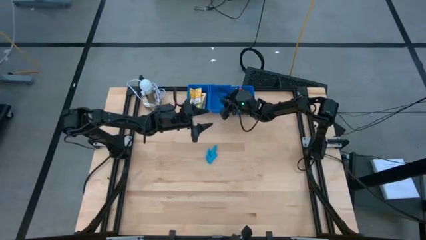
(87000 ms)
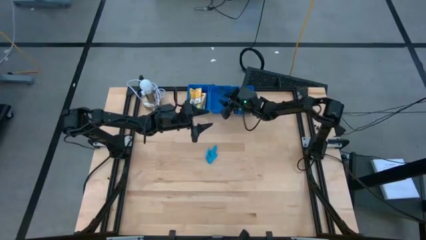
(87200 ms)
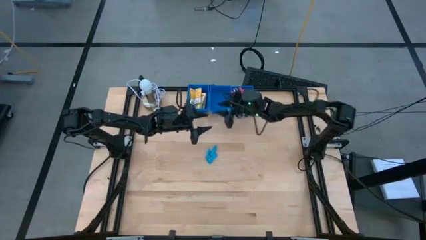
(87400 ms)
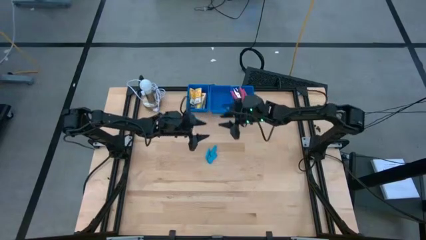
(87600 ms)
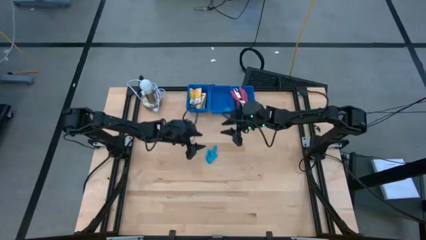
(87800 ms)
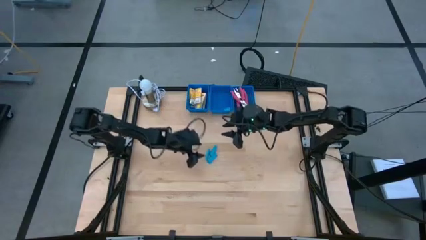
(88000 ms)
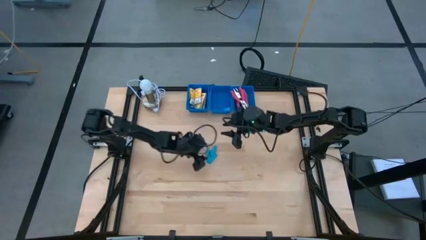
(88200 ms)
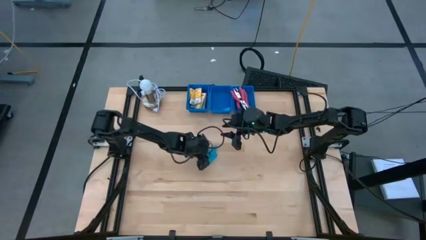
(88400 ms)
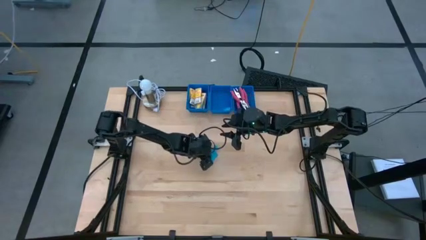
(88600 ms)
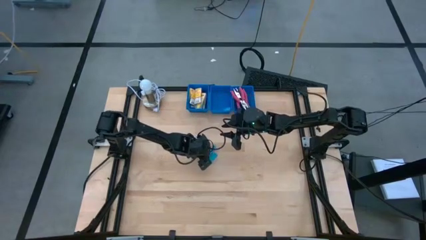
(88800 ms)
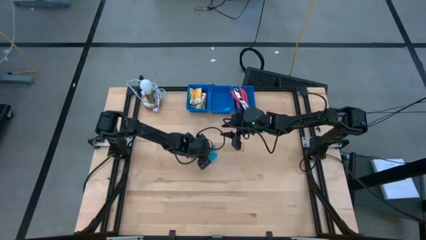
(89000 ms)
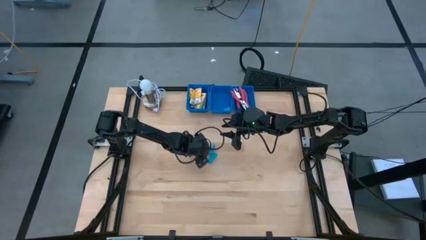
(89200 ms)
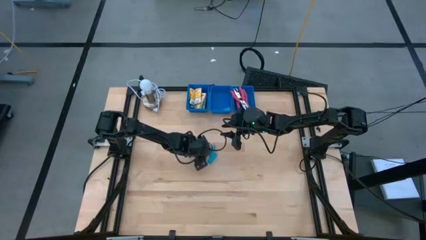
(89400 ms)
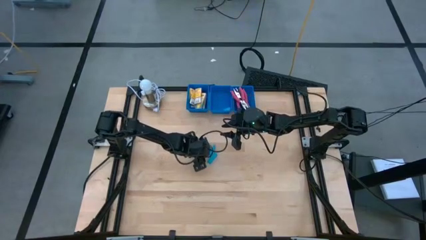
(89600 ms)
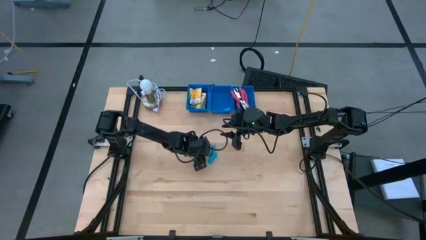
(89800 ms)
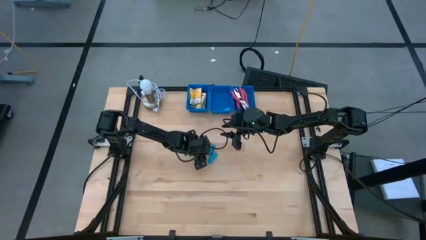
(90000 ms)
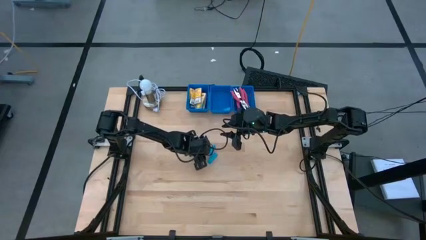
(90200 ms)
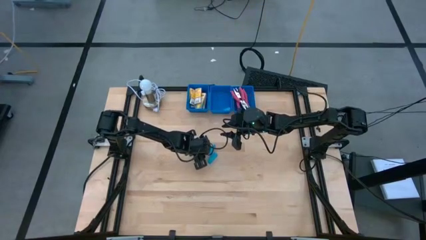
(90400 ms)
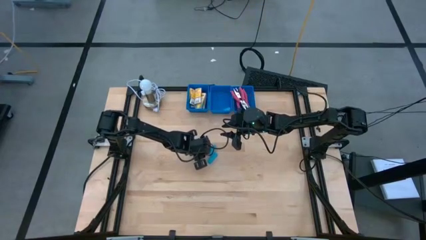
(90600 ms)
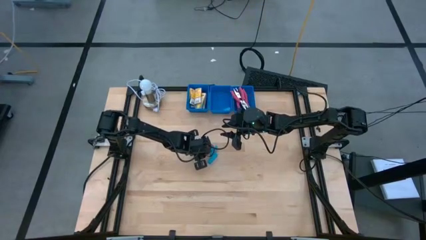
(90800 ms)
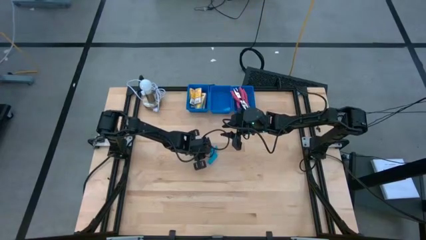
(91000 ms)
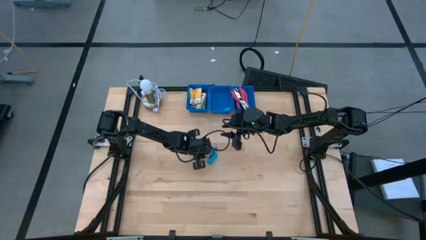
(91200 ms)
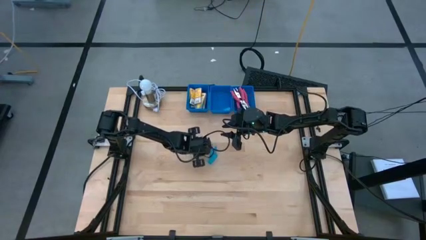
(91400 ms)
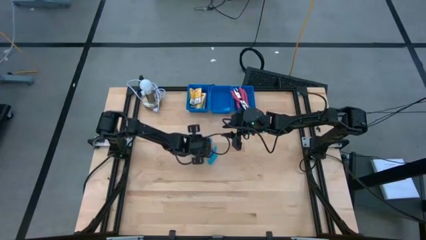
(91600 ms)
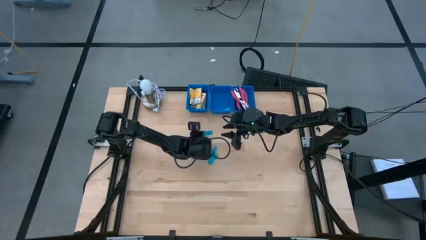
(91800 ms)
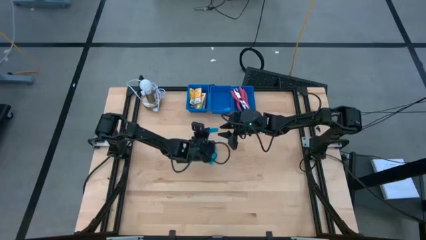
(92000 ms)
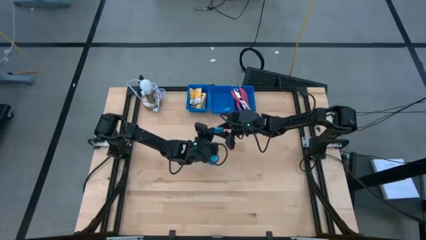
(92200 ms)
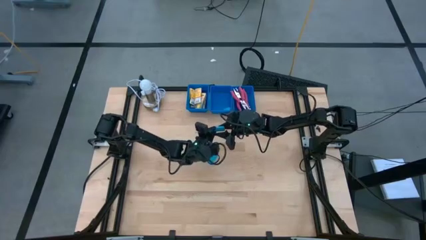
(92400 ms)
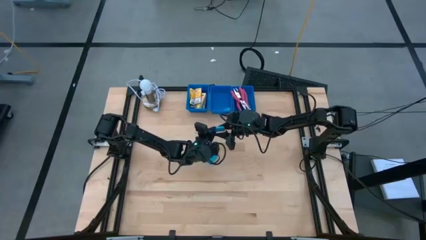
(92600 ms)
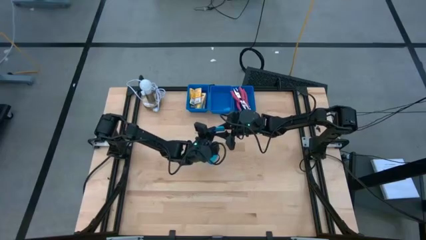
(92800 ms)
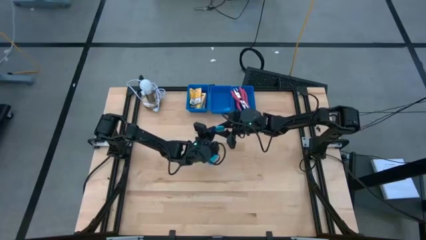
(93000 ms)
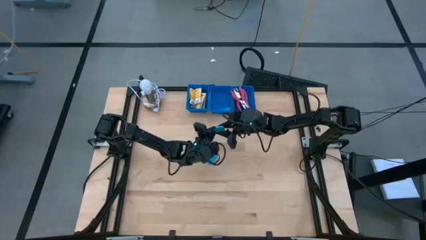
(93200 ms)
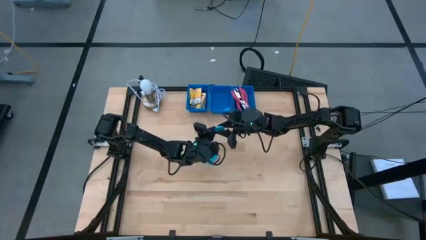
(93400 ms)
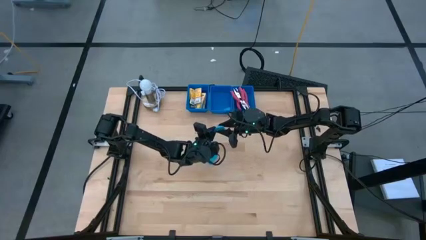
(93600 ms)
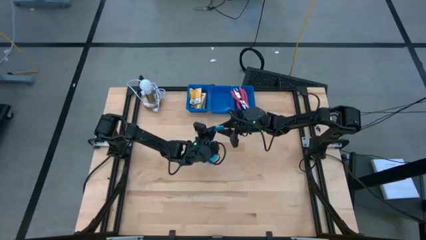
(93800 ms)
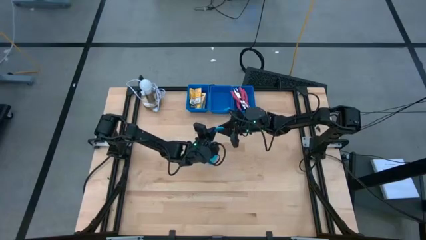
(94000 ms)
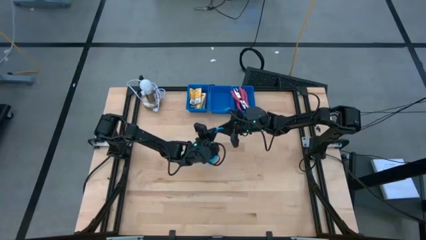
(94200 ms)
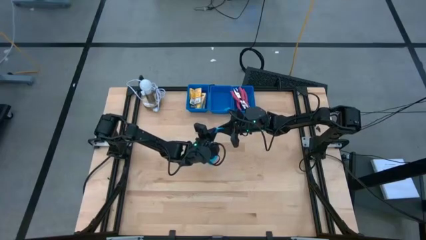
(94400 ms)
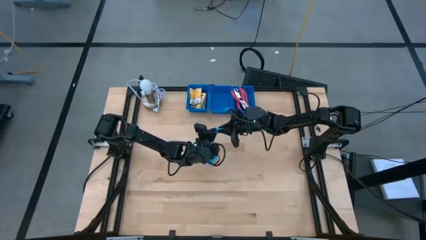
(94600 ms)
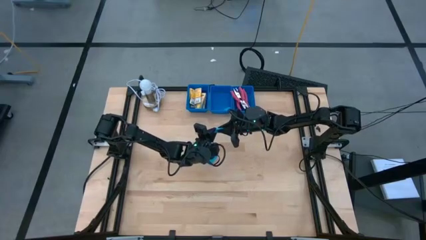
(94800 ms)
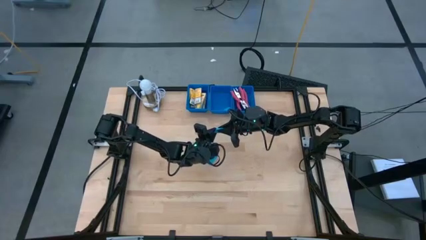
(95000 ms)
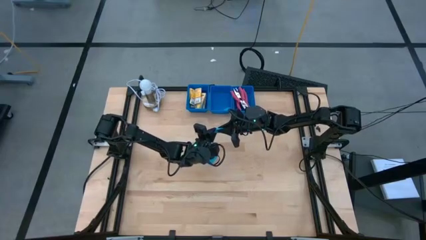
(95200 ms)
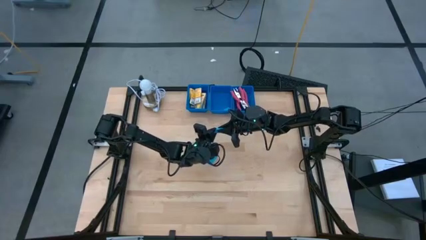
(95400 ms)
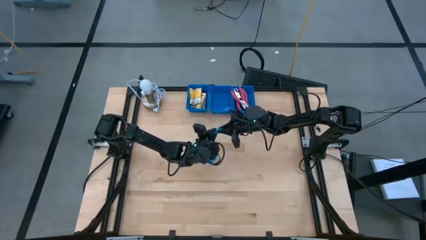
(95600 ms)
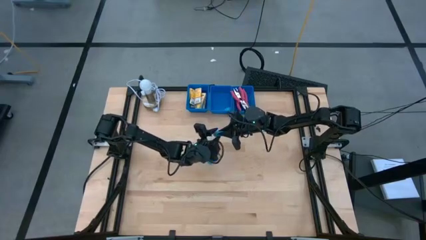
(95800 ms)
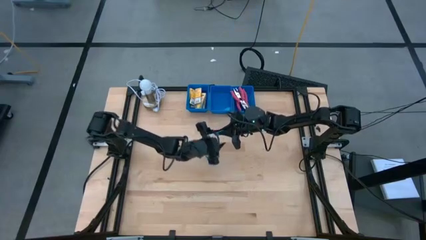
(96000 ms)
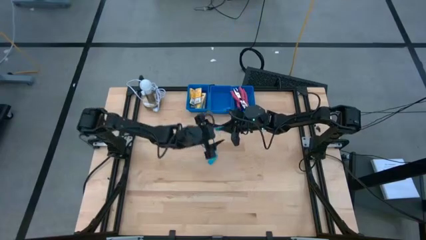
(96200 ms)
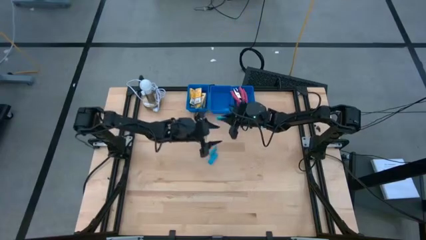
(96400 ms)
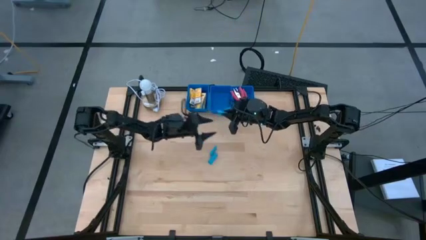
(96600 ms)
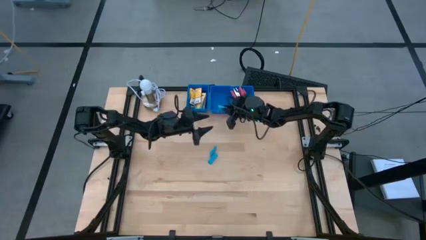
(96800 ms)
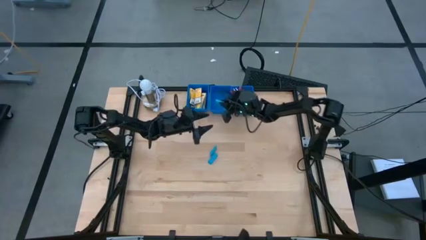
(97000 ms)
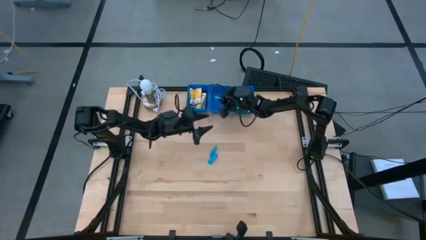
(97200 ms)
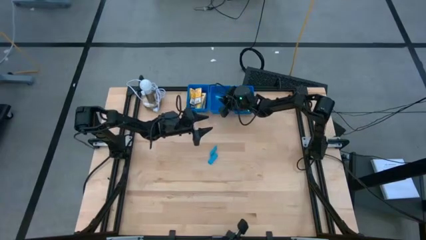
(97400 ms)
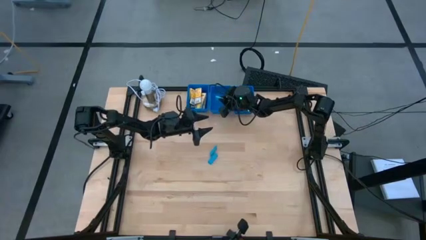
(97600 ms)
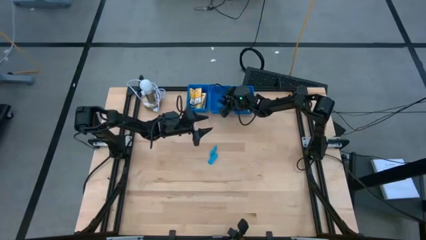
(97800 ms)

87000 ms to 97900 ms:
Task: Pick & Place School Supplies
Put the blue eraser into the middle blue bin

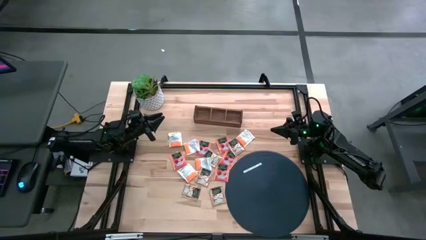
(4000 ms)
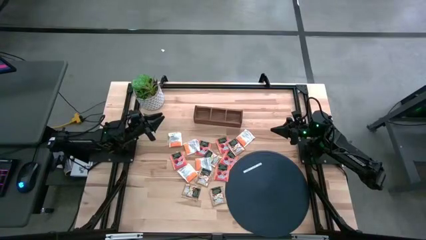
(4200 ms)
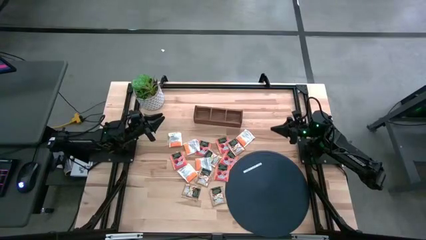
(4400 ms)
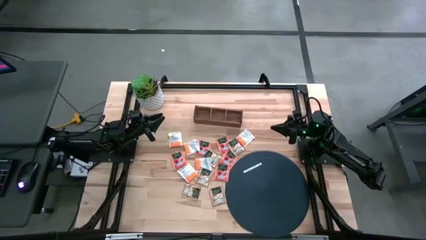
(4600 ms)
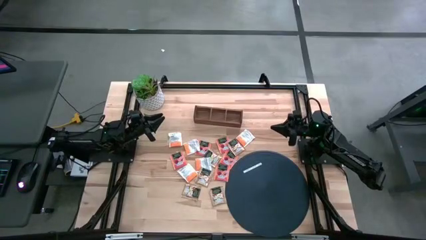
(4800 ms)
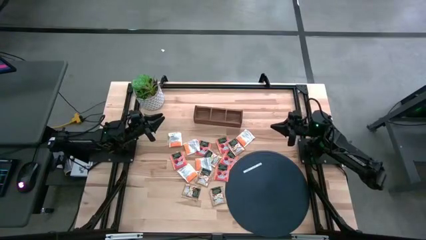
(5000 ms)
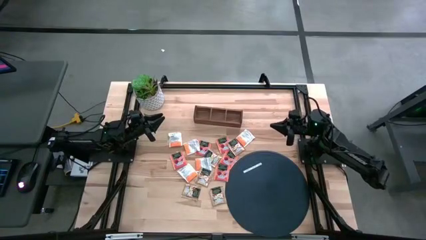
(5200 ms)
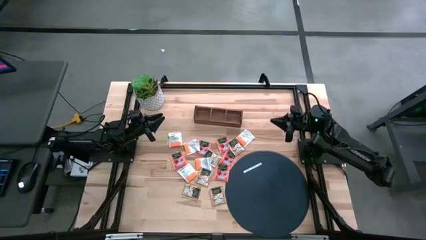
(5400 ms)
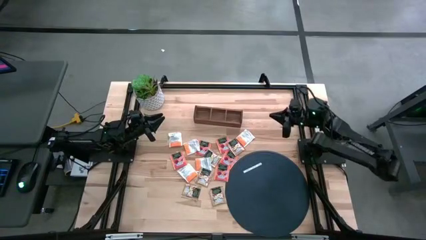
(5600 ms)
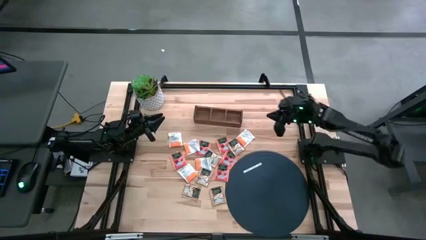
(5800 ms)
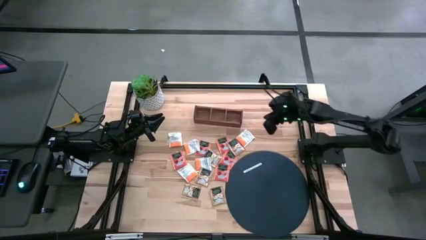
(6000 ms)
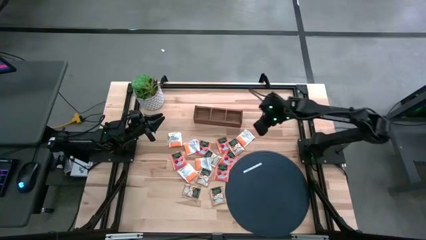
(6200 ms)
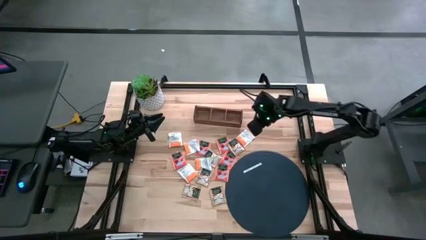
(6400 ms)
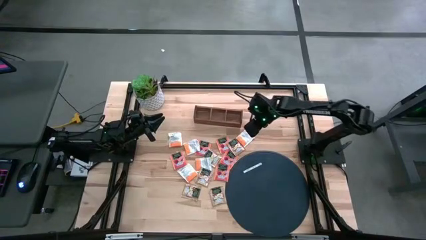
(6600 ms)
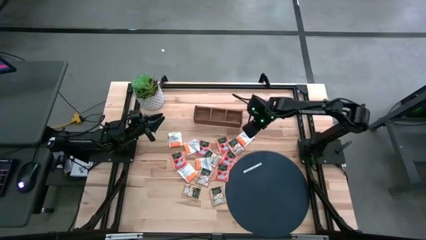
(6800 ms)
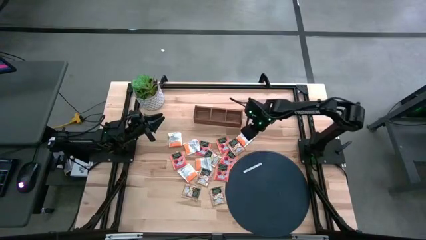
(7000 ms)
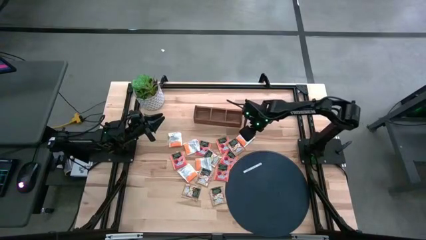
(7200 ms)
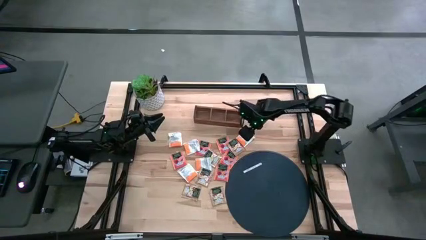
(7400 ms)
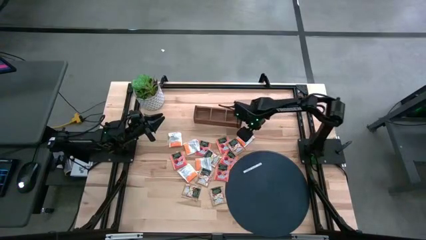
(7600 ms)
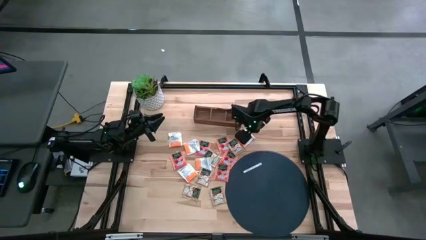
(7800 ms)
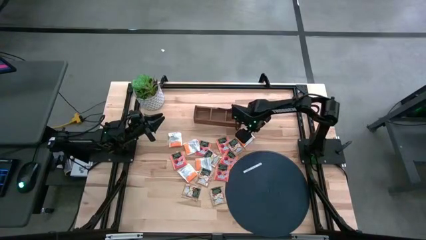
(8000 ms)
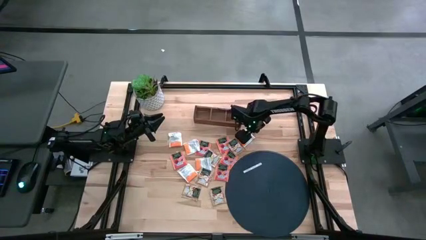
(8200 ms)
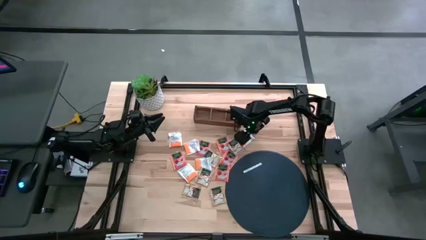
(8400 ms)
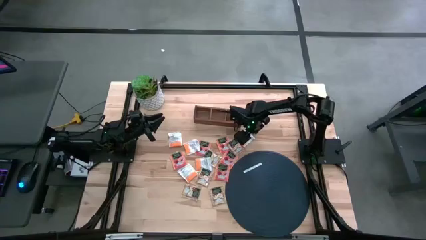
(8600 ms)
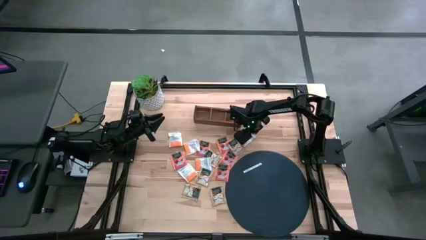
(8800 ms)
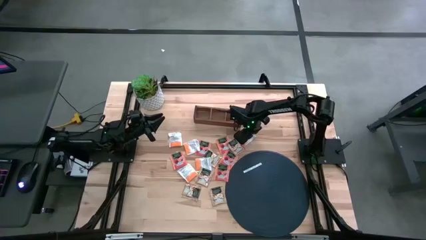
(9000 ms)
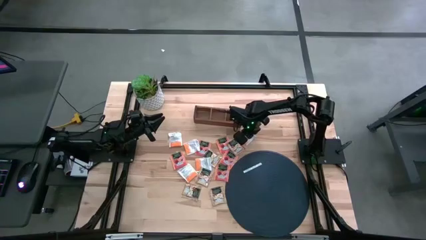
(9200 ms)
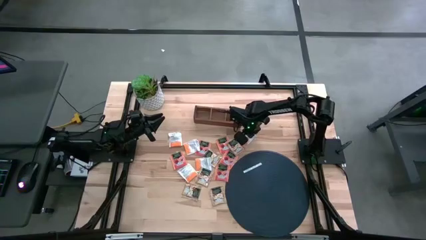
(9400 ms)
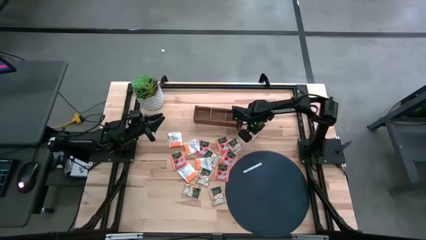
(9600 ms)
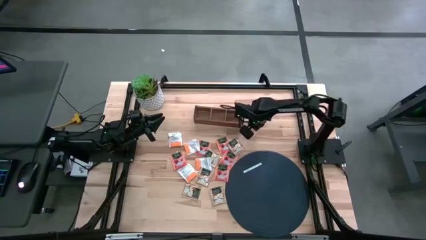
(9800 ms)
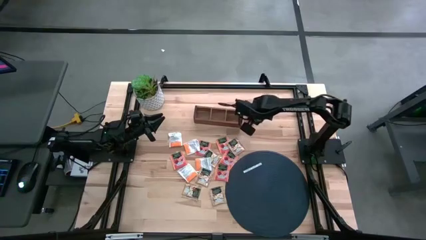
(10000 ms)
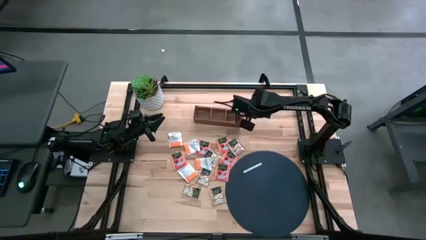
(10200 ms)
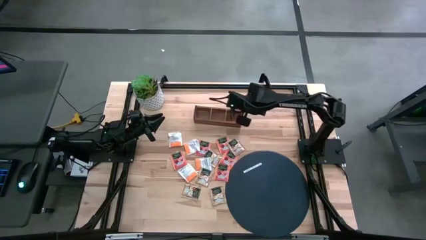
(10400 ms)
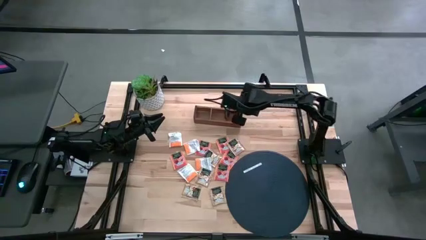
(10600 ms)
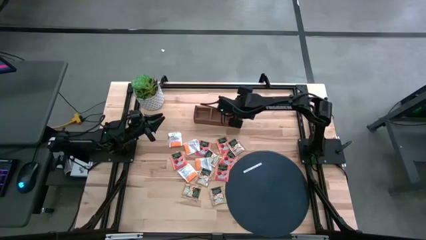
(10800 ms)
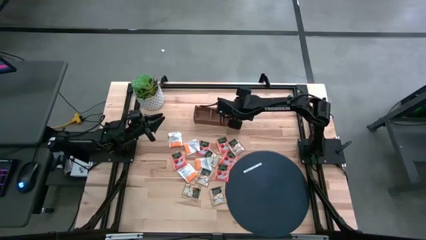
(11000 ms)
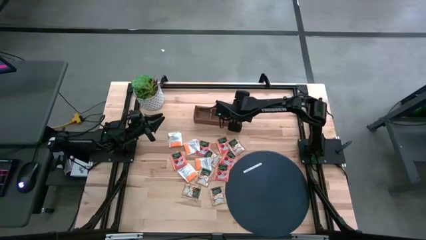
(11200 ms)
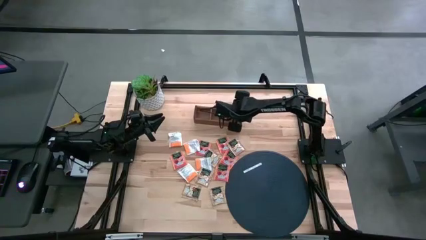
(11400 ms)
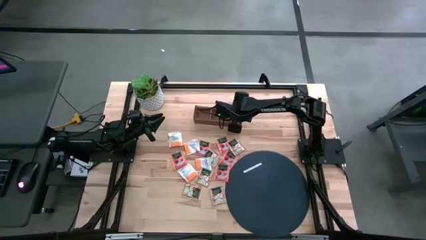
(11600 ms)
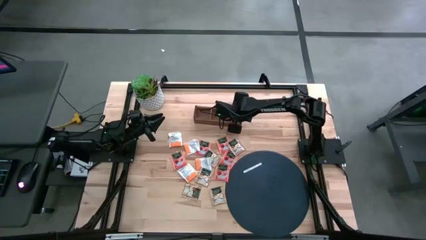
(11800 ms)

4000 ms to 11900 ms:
Task: Pick & Place Tea
Put the white orange tea sachet into the right section of the wooden organizer
